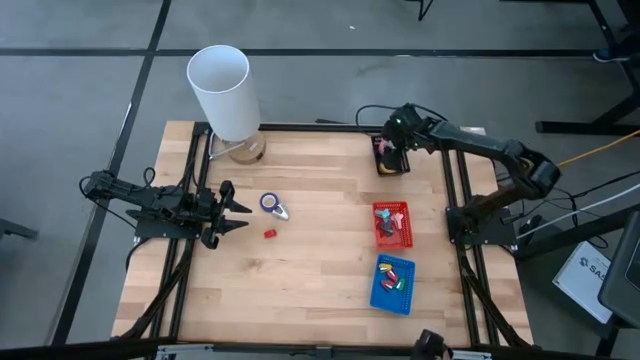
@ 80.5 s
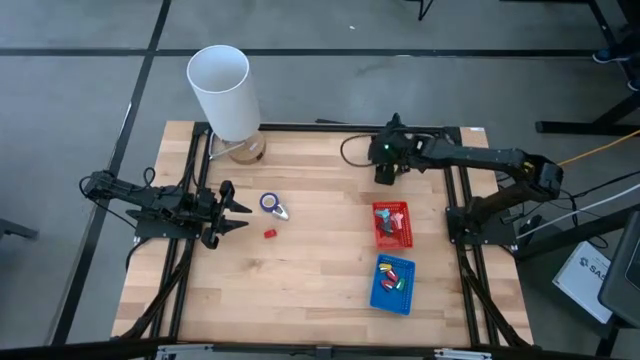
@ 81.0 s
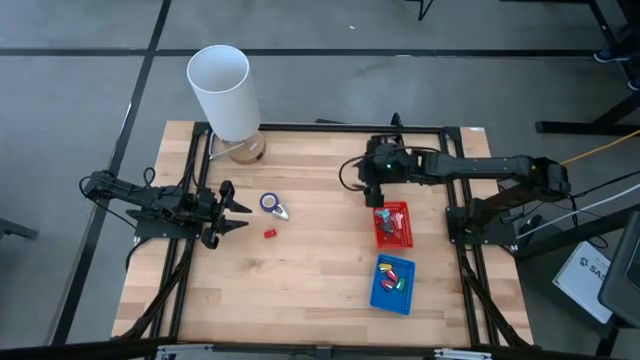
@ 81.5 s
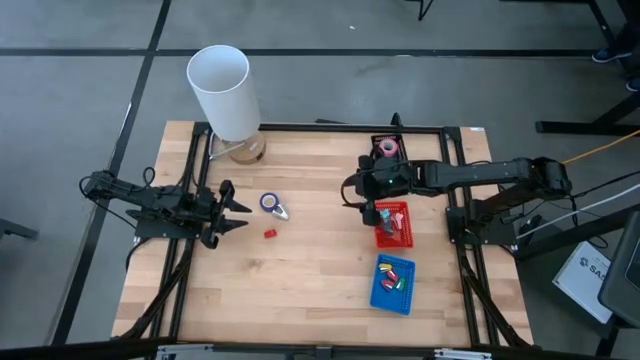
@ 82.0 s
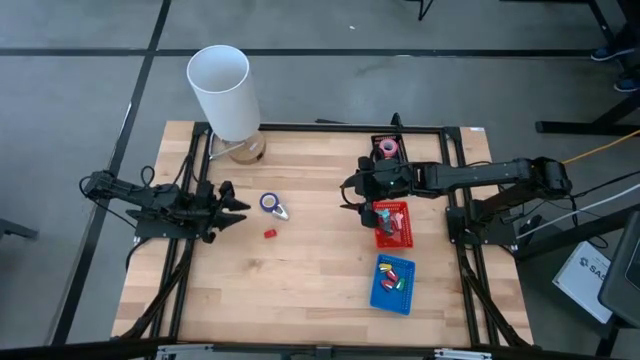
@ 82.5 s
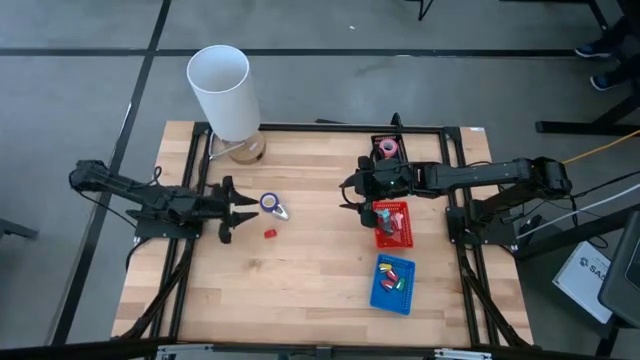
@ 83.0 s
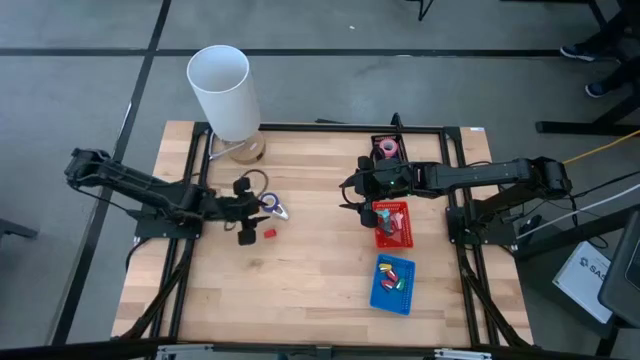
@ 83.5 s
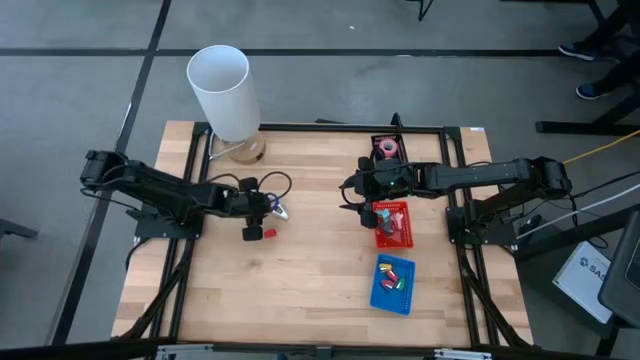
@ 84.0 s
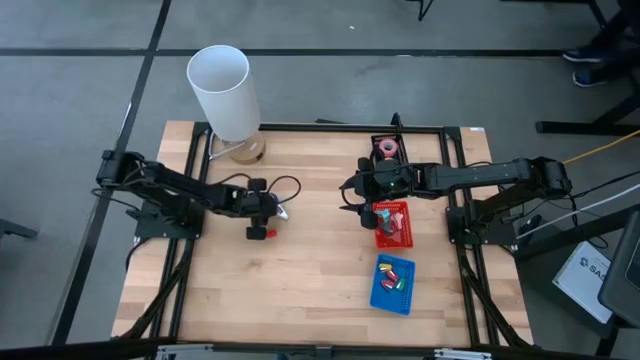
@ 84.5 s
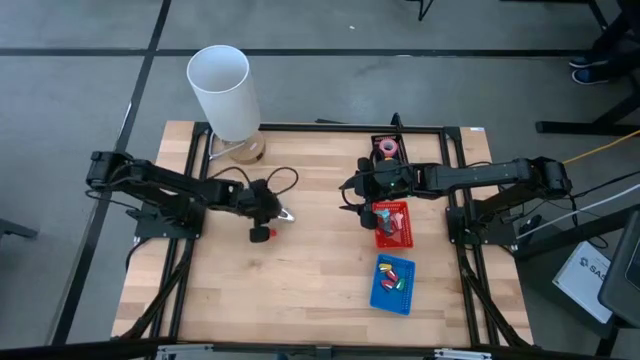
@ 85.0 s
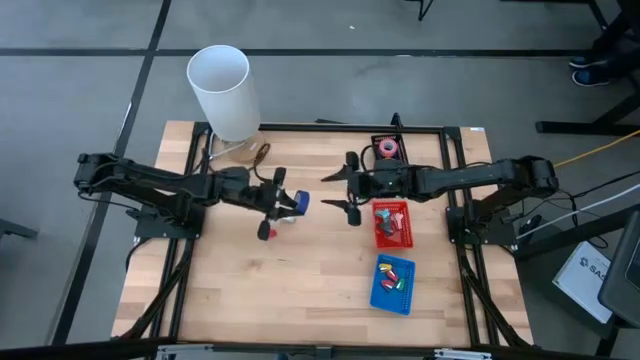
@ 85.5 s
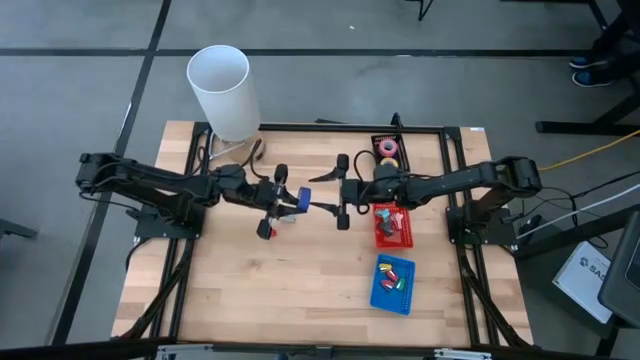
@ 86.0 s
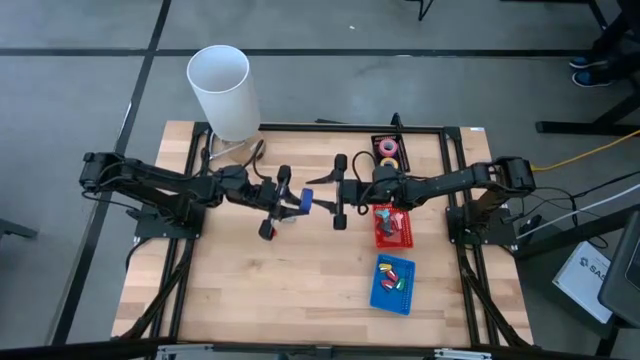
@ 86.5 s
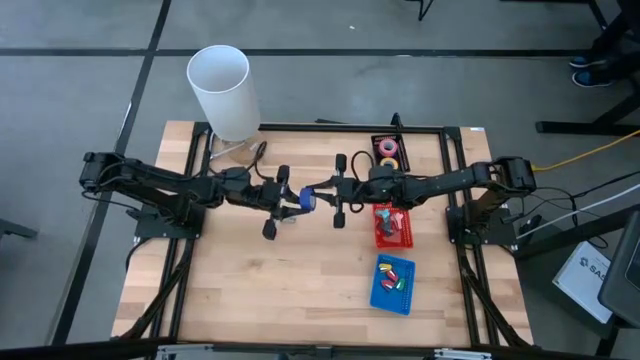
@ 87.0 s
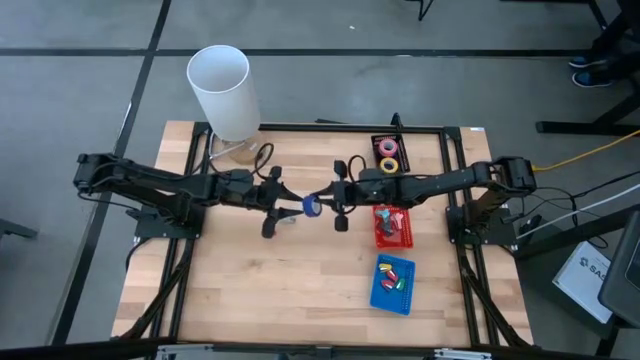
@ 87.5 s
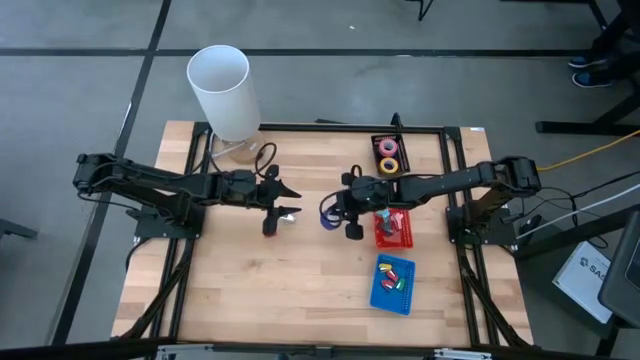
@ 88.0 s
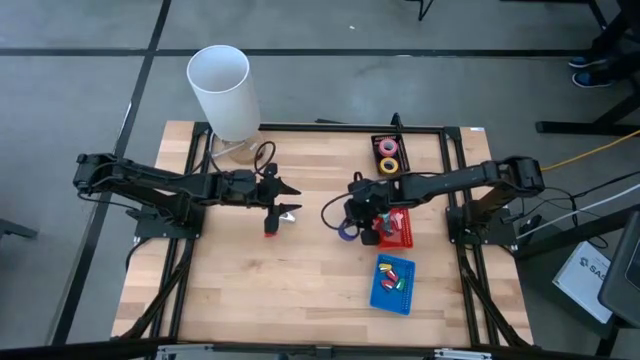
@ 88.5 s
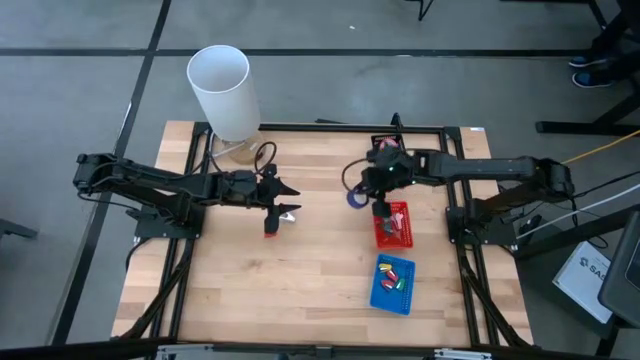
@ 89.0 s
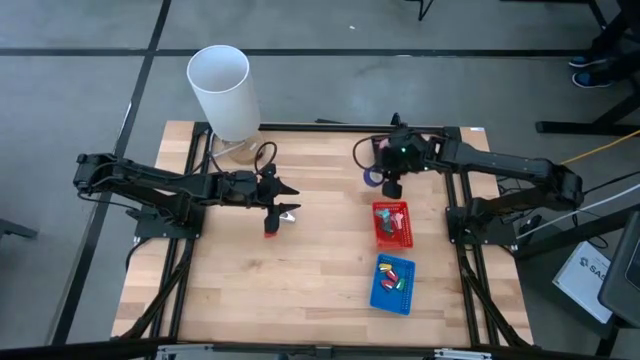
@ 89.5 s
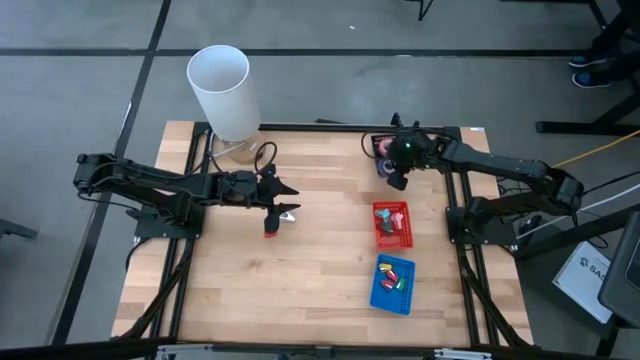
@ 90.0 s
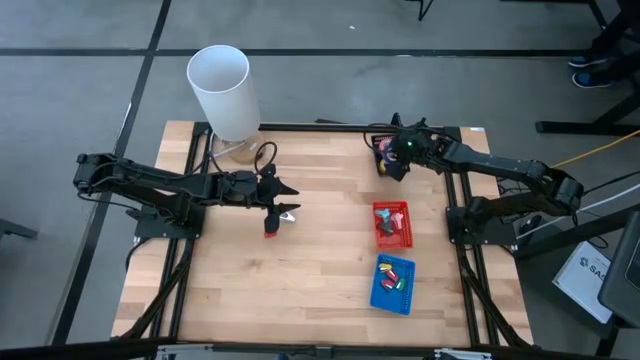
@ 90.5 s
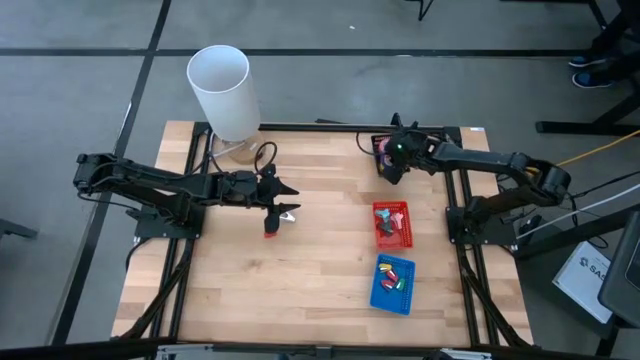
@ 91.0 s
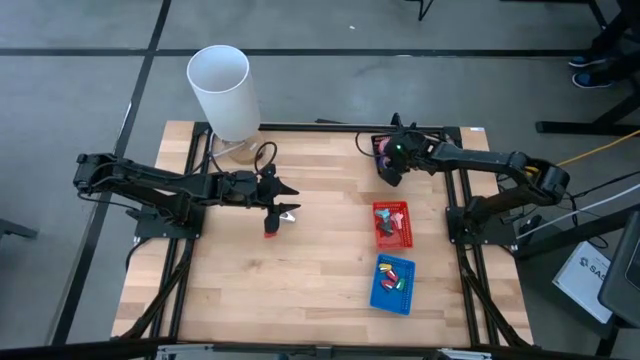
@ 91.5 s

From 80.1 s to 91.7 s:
Task: Pick and place Stapler, Stapler remover, tape
Put the purple tape into the black basket

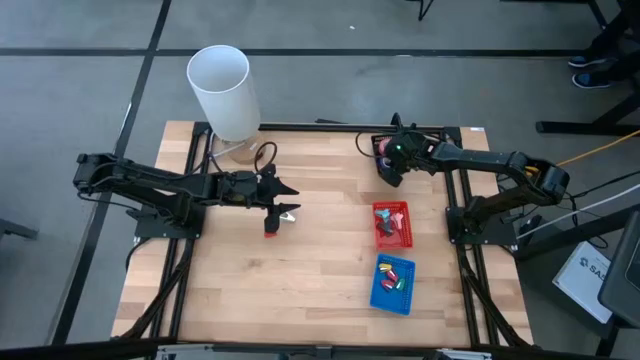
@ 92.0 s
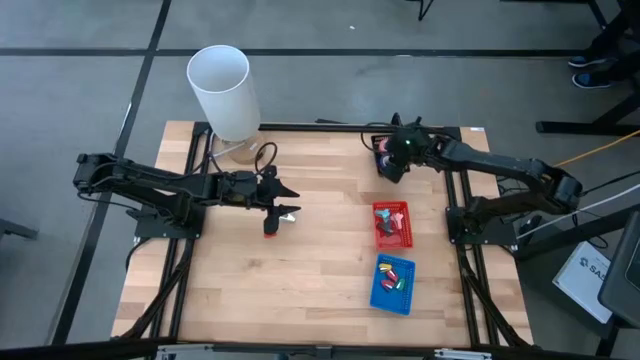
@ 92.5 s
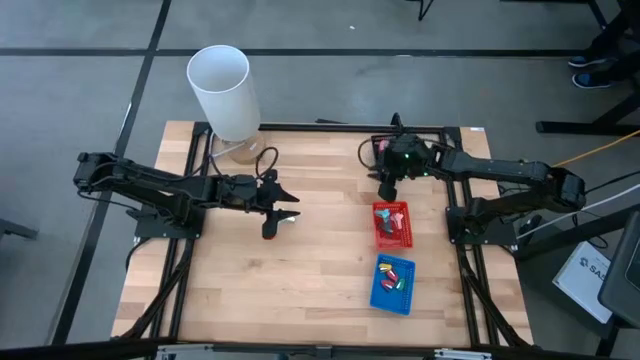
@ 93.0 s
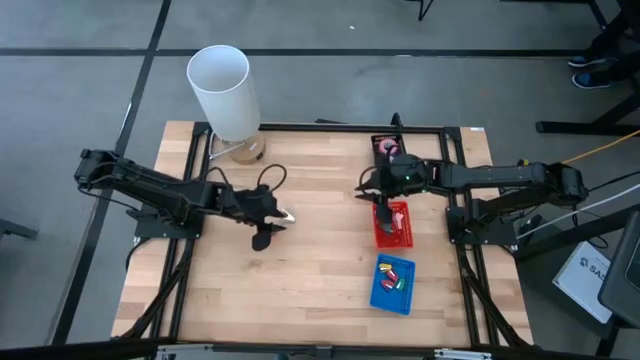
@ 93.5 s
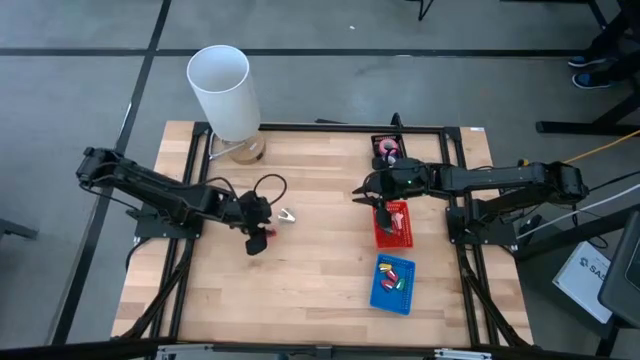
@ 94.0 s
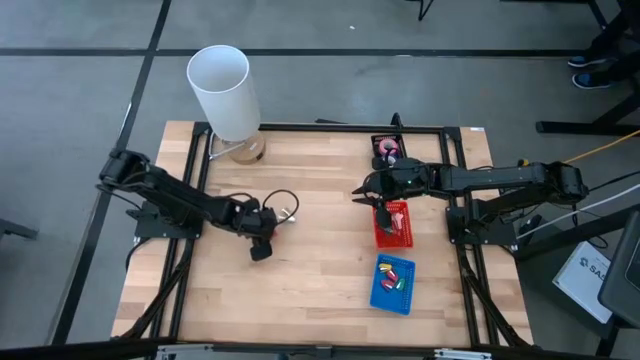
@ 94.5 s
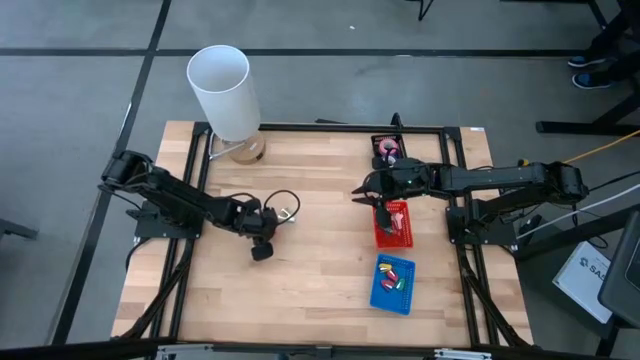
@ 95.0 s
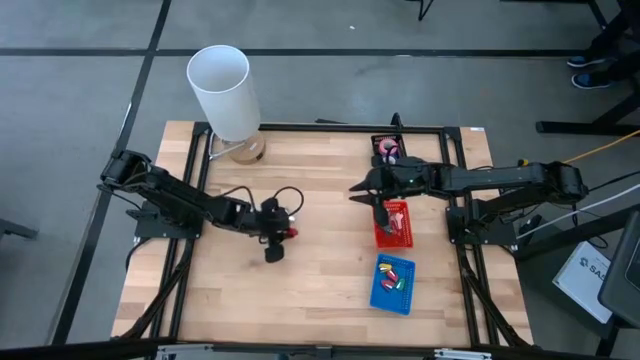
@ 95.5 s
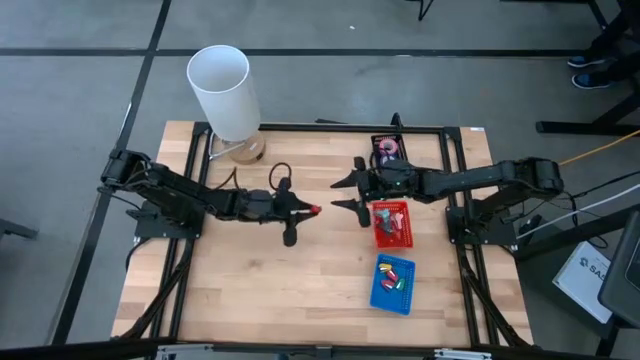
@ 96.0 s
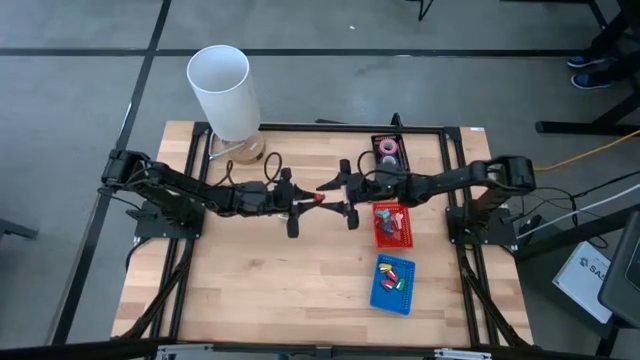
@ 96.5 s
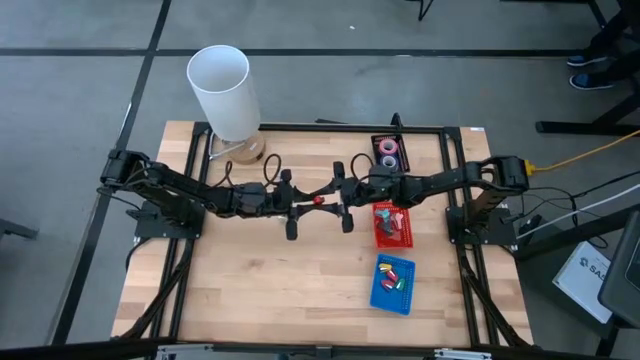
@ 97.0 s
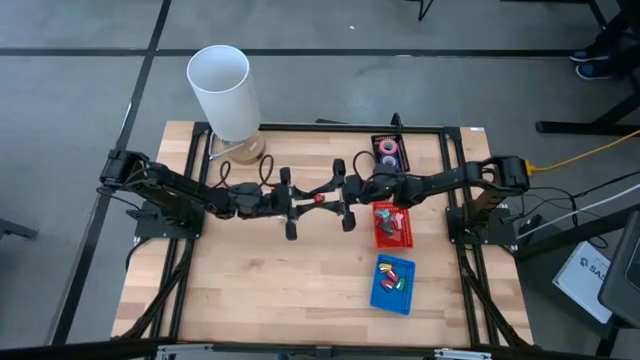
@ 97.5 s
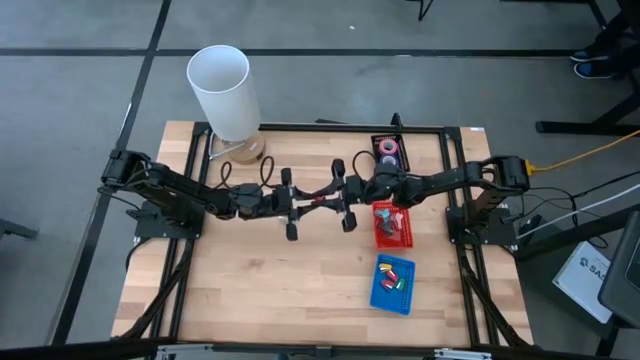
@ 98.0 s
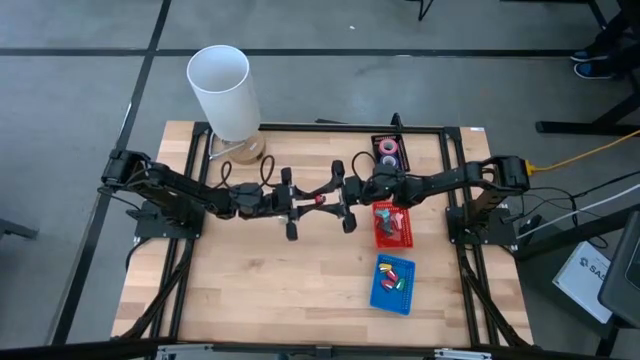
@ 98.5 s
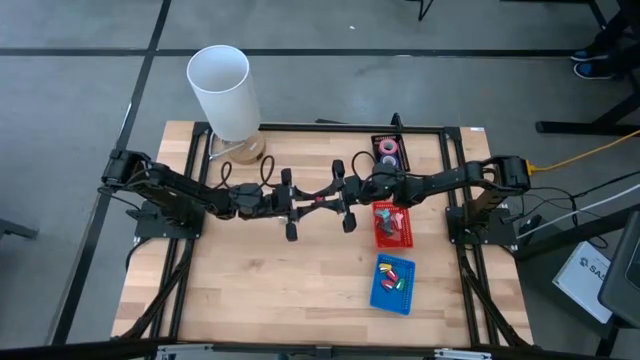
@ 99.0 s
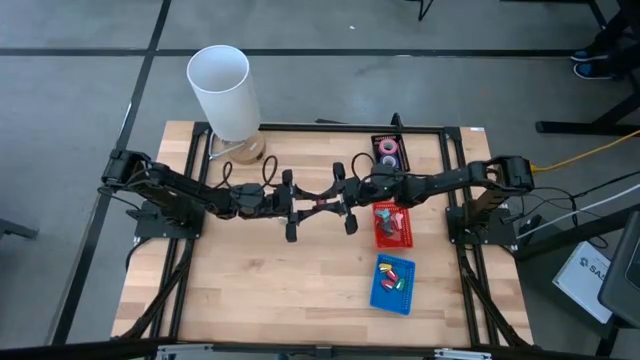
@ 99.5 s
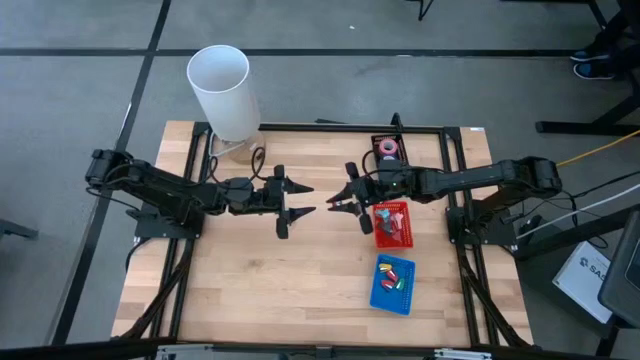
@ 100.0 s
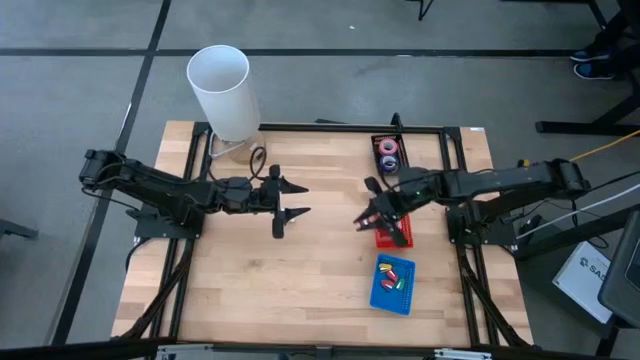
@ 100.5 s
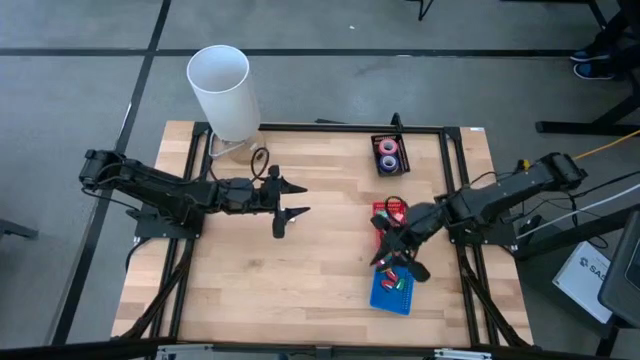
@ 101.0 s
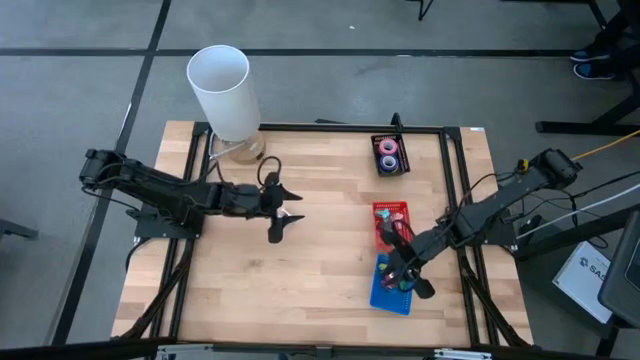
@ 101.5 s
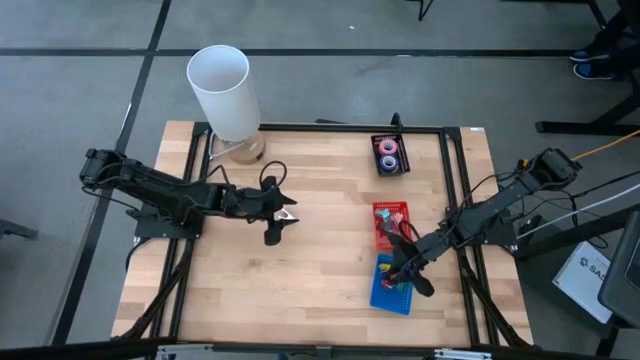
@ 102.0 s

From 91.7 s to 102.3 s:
Put the red stapler into the blue basket
